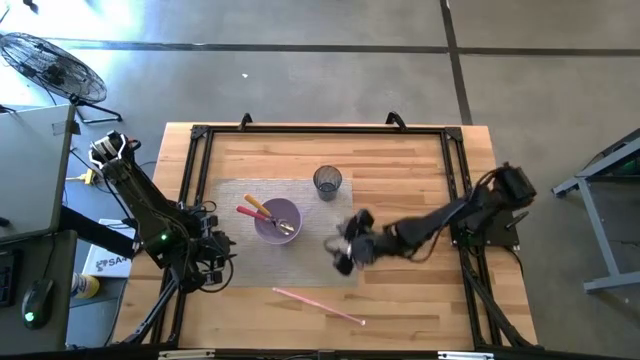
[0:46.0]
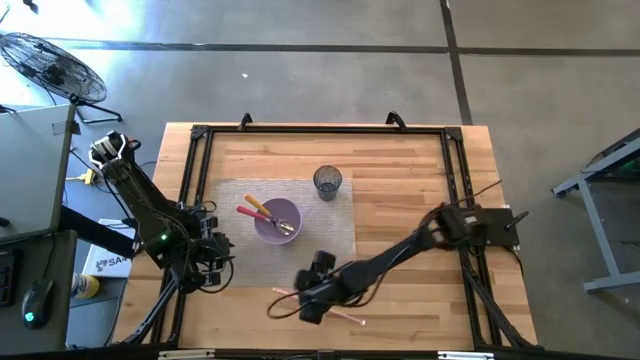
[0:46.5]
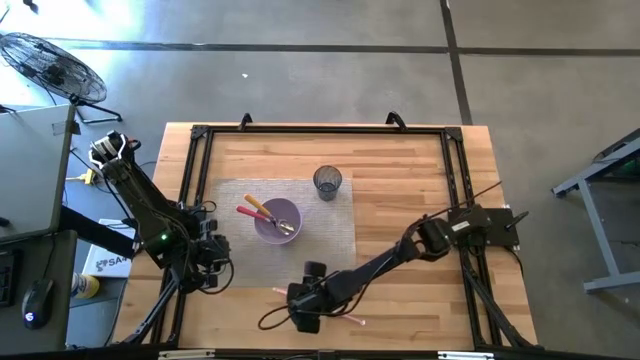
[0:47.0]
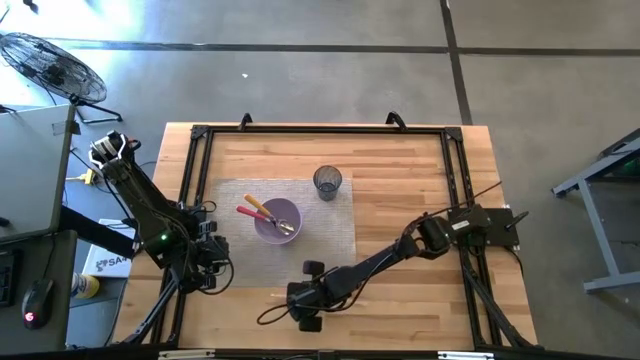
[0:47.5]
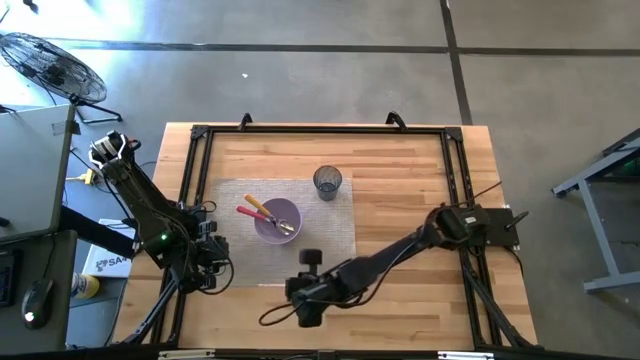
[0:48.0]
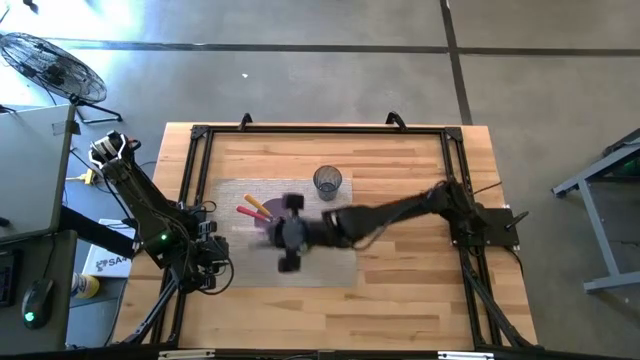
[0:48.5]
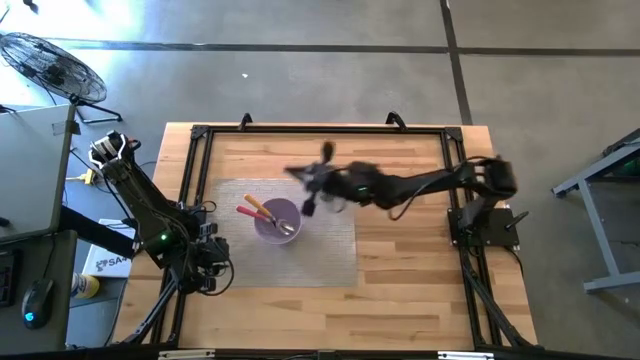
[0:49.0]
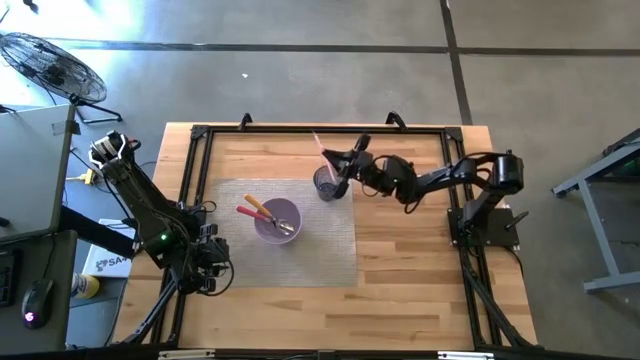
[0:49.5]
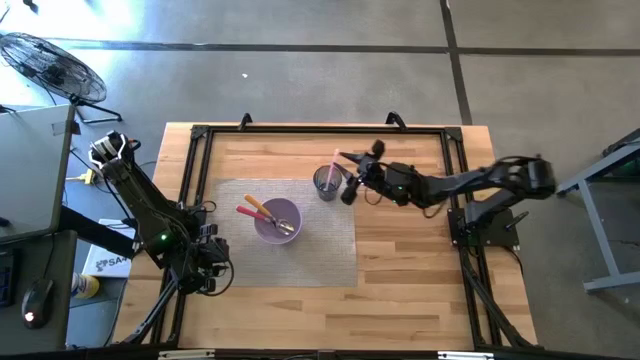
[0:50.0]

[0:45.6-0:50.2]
Task: Pick & Place Utensil
Put the pink straw into the blue cup on the brown placemat

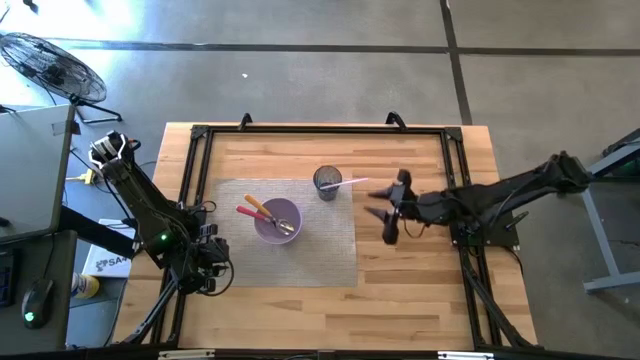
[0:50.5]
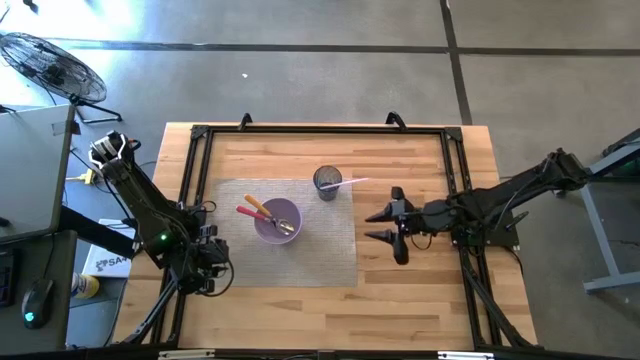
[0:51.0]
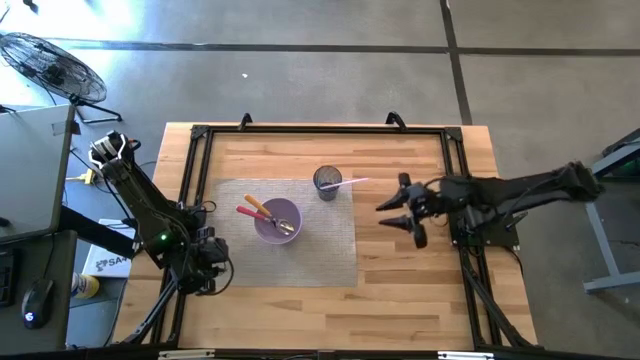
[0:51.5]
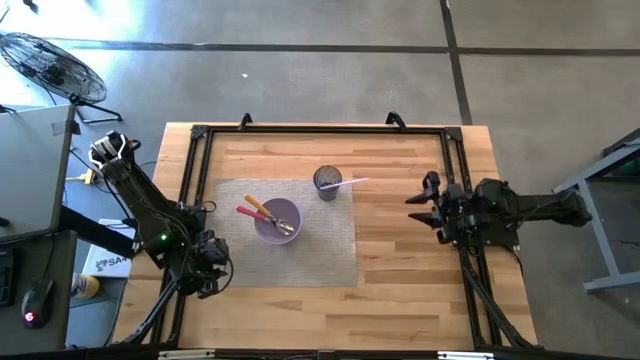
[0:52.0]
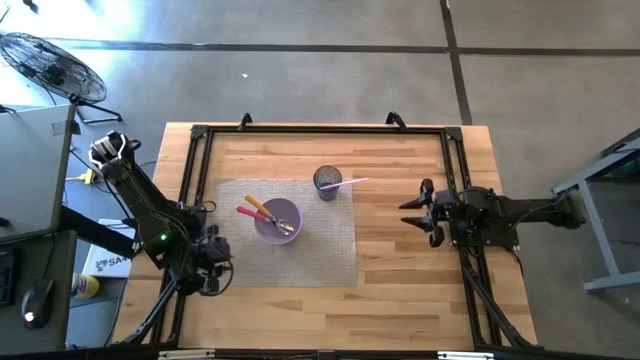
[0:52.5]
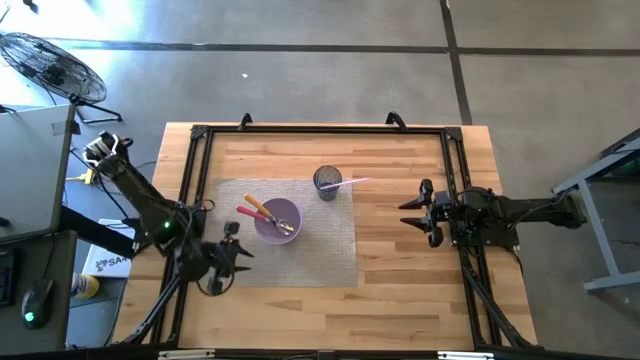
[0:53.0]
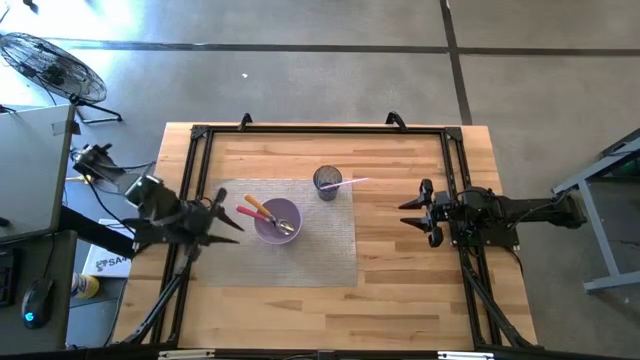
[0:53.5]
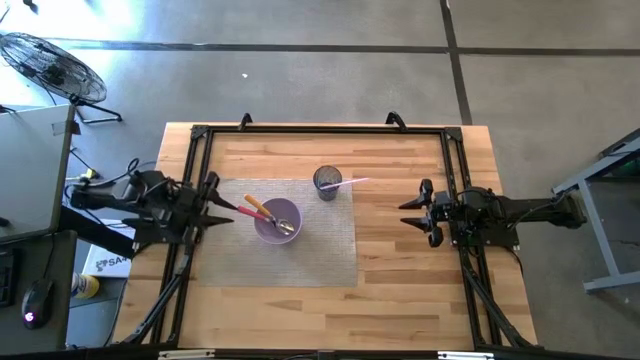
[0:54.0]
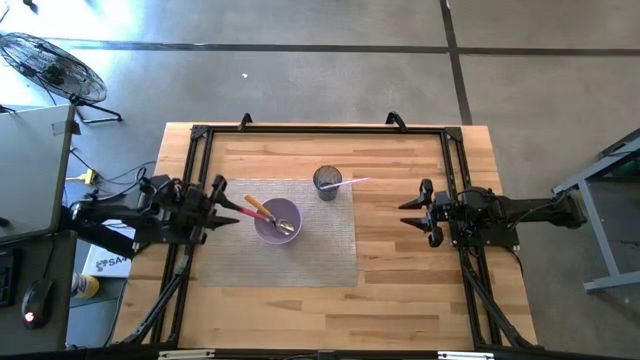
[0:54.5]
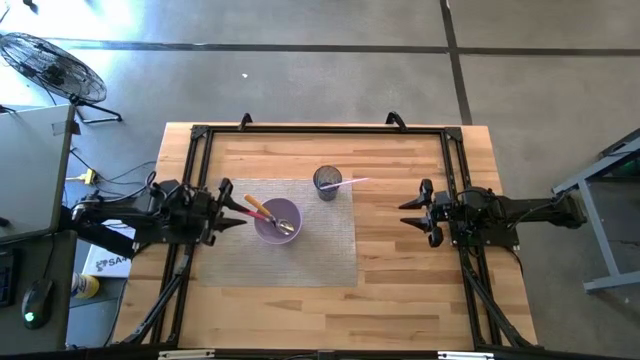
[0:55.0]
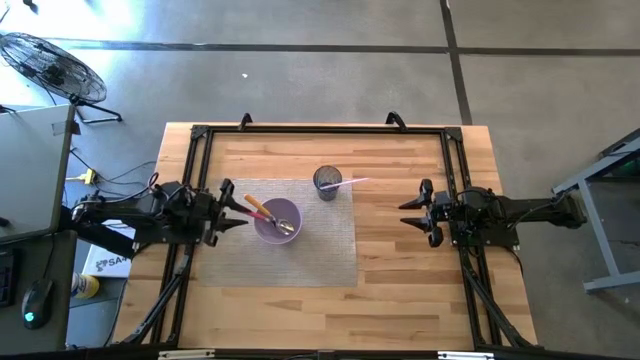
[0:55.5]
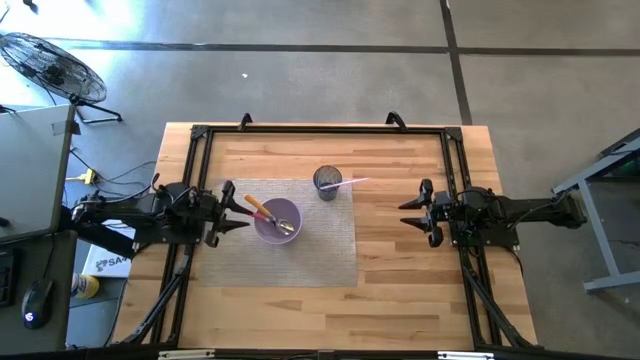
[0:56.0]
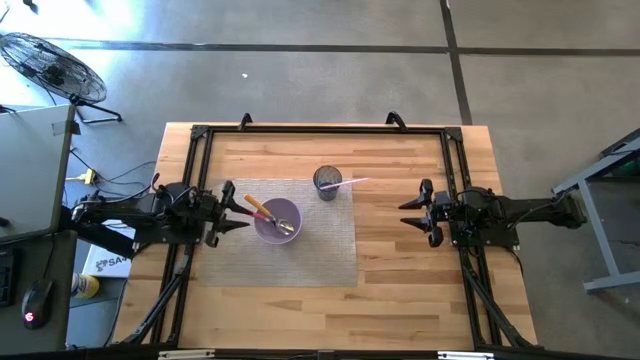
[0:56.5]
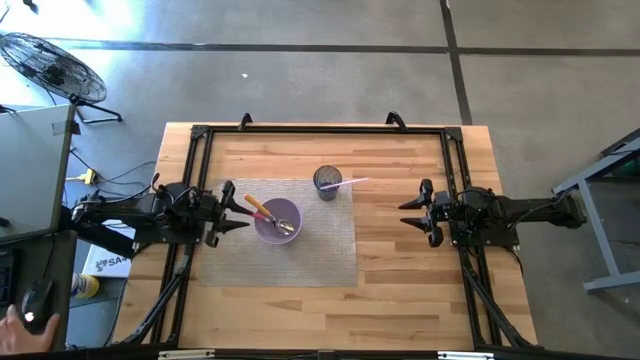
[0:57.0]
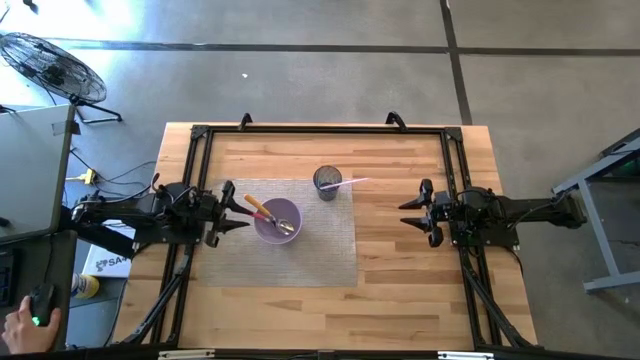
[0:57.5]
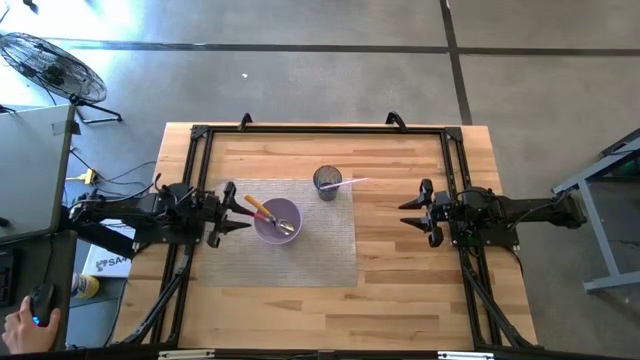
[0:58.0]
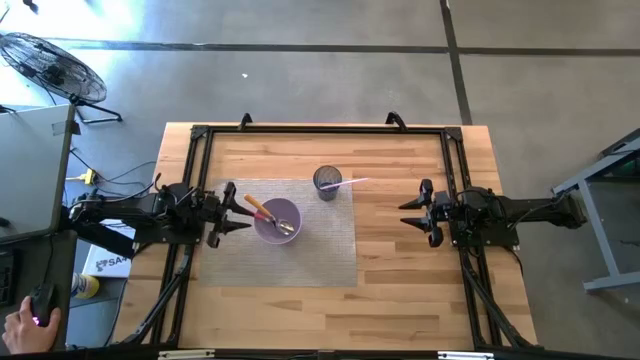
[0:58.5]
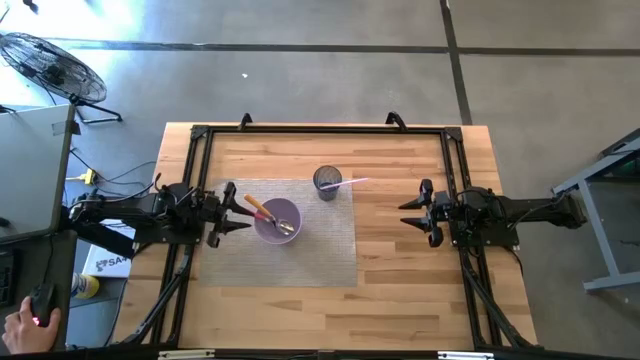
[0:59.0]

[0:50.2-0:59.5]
Return to Home Position

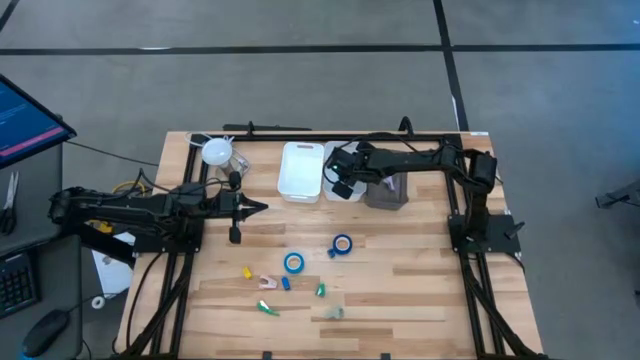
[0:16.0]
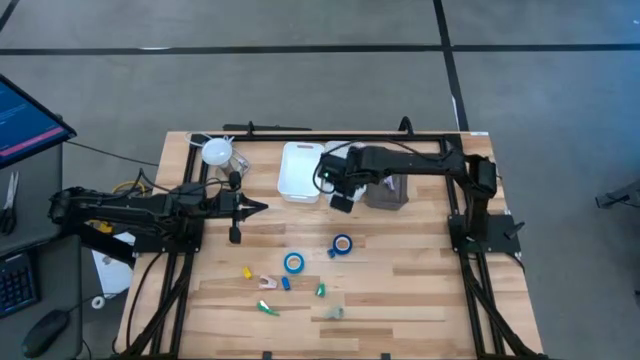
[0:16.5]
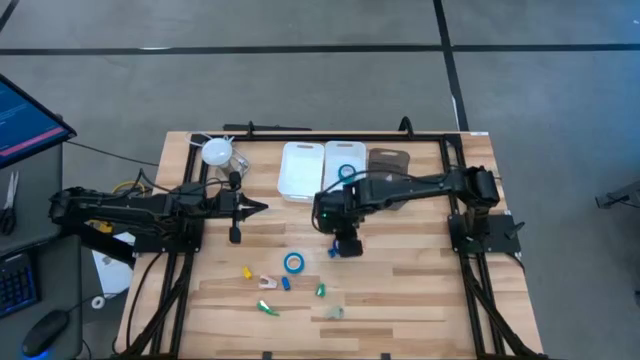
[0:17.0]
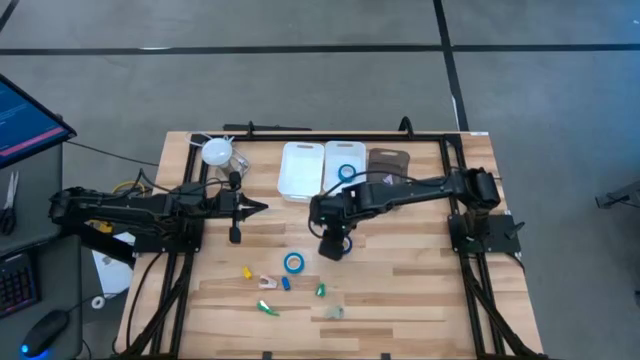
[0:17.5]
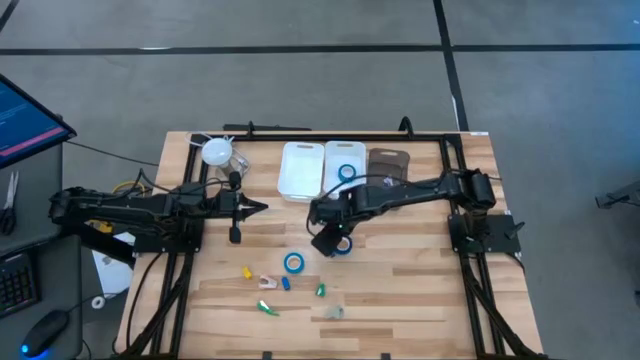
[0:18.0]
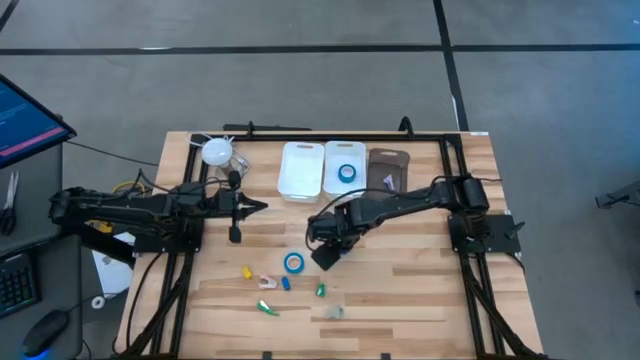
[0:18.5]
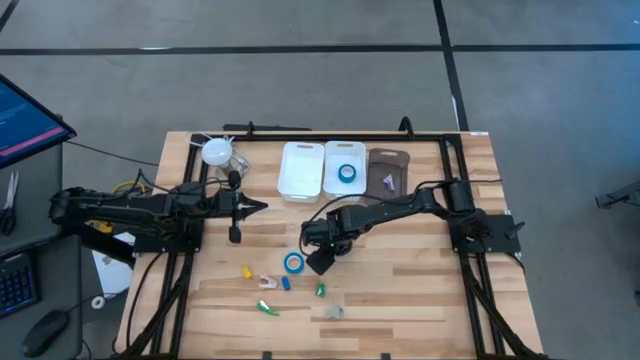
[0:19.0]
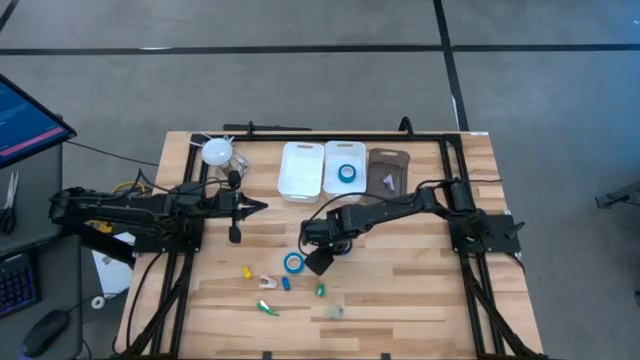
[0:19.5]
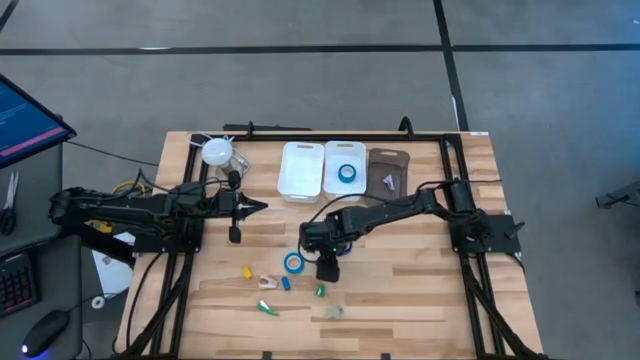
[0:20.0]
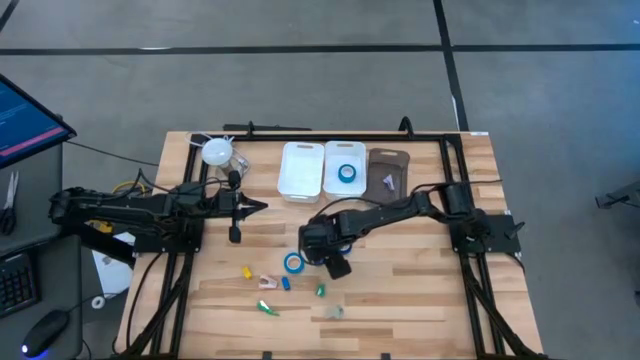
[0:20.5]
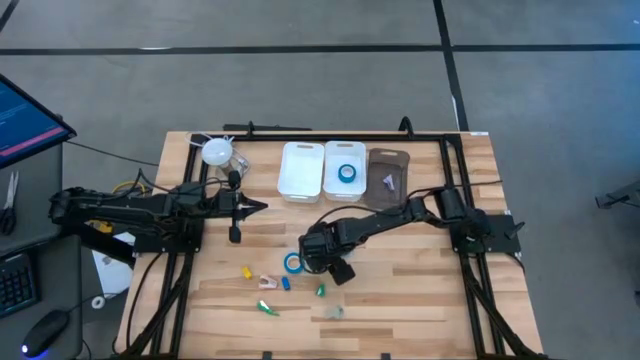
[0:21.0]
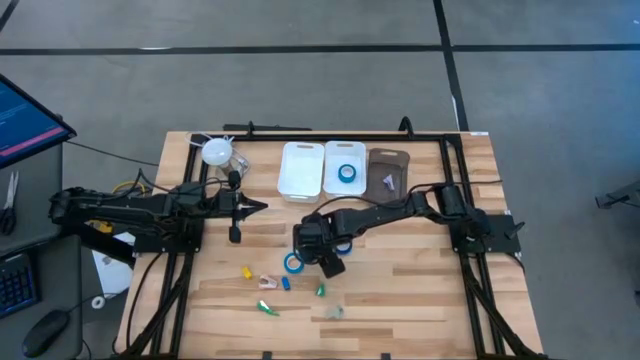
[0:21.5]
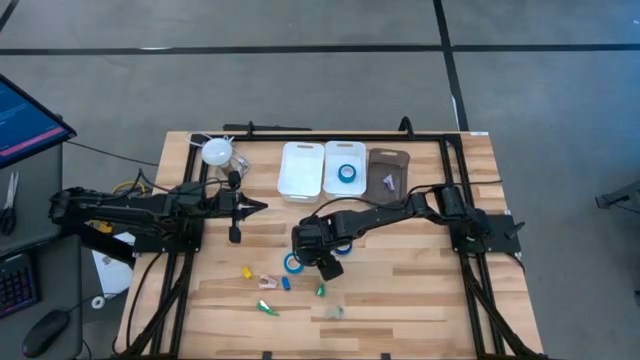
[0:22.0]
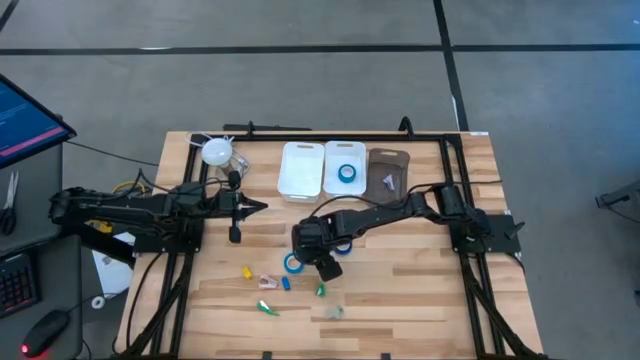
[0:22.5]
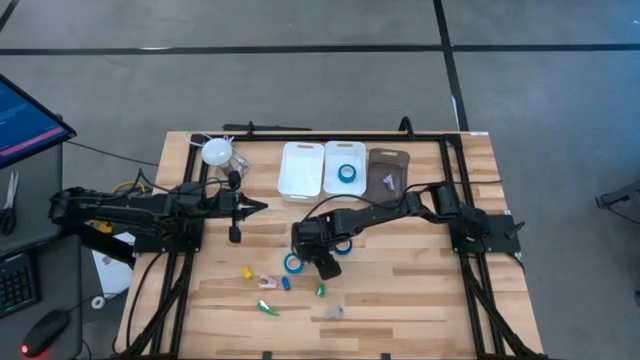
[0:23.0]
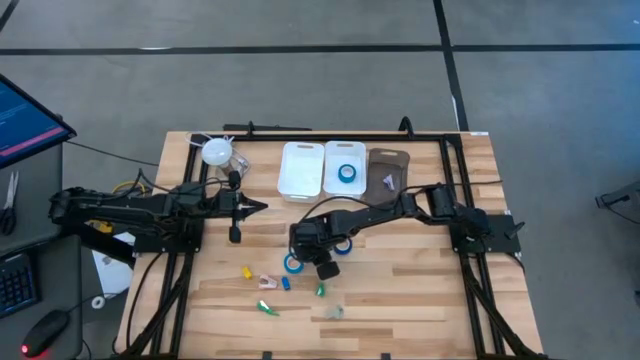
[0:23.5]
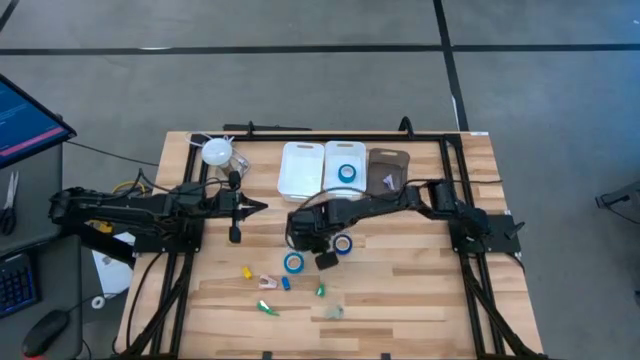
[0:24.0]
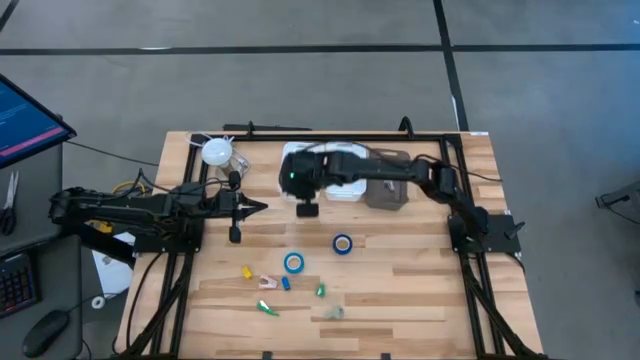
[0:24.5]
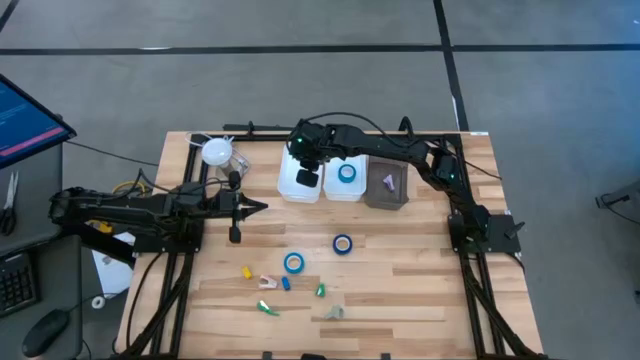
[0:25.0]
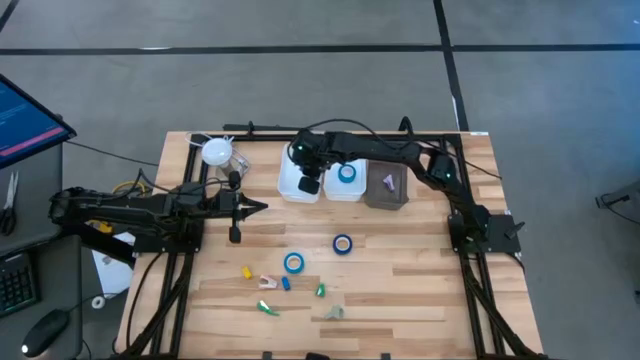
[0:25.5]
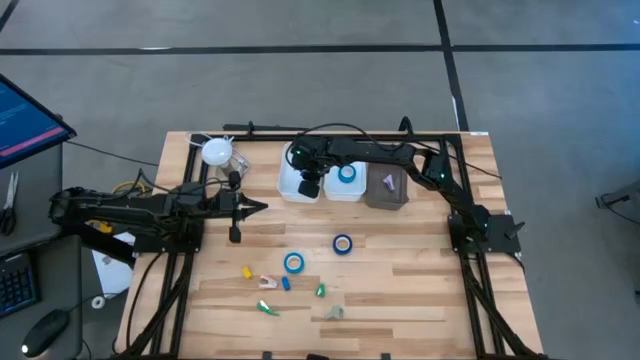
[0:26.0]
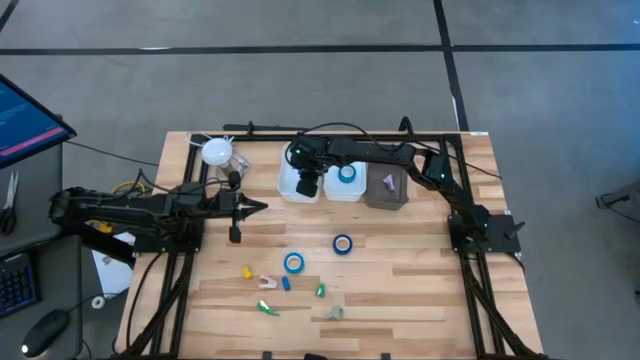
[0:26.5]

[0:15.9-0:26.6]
Task: Pick and place Stapler, Stapler remover, tape
Put the top blue stapler into the left white bin
